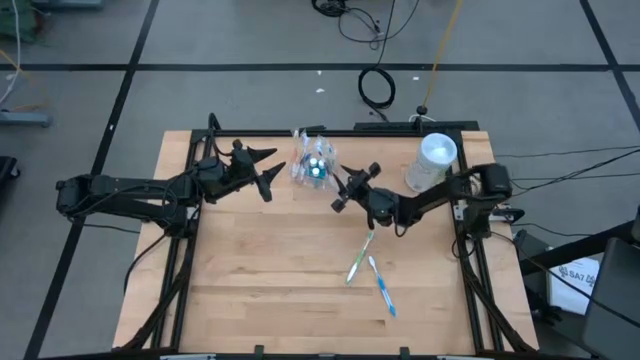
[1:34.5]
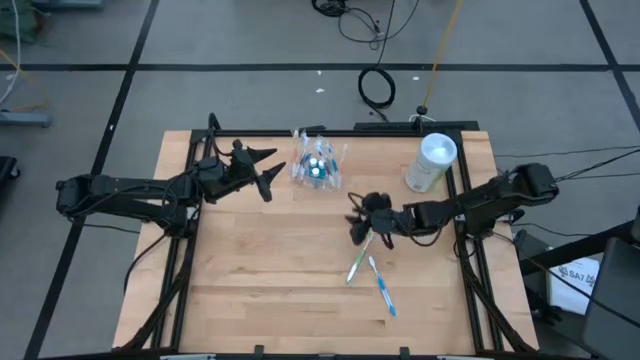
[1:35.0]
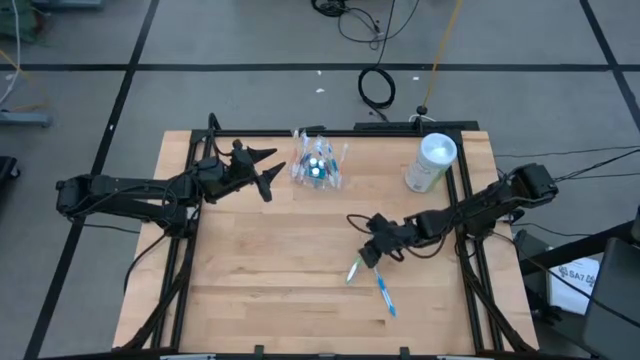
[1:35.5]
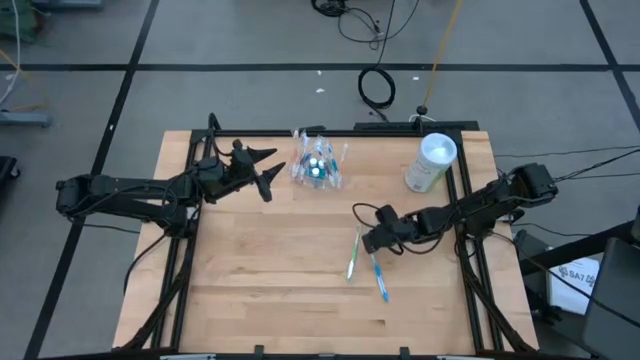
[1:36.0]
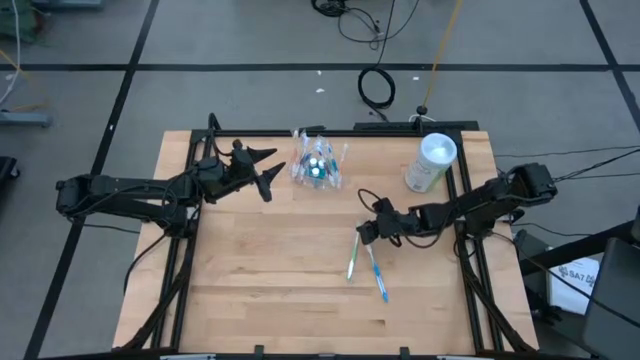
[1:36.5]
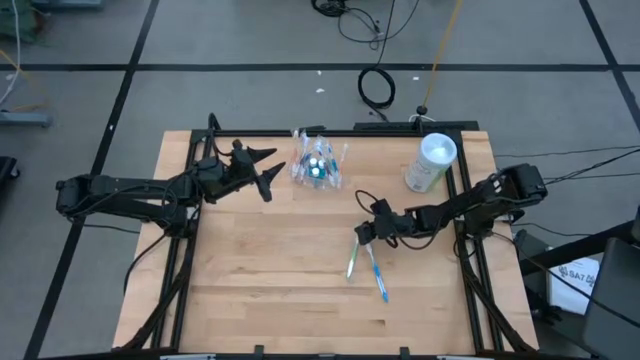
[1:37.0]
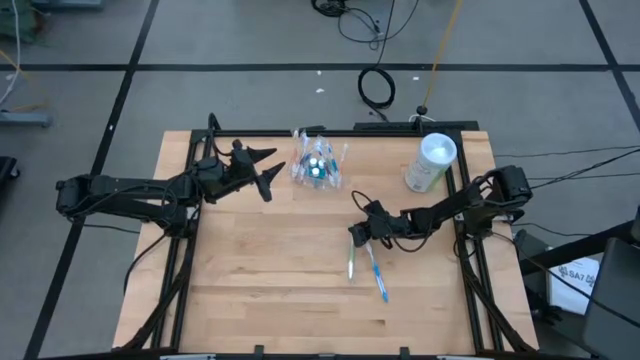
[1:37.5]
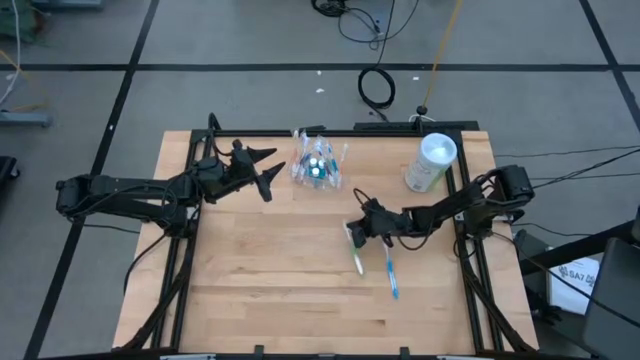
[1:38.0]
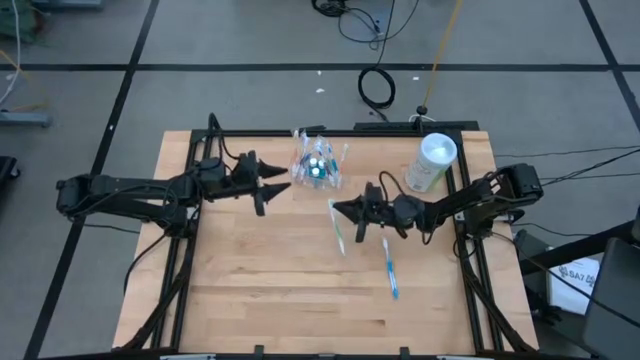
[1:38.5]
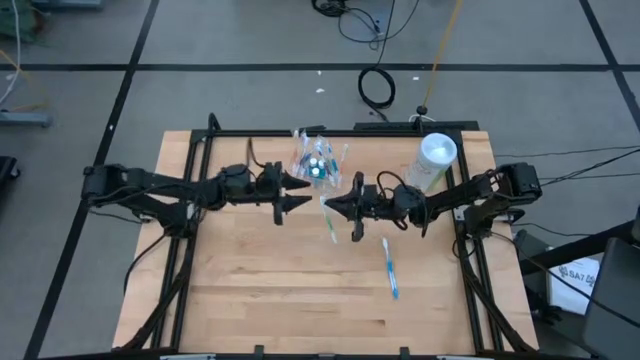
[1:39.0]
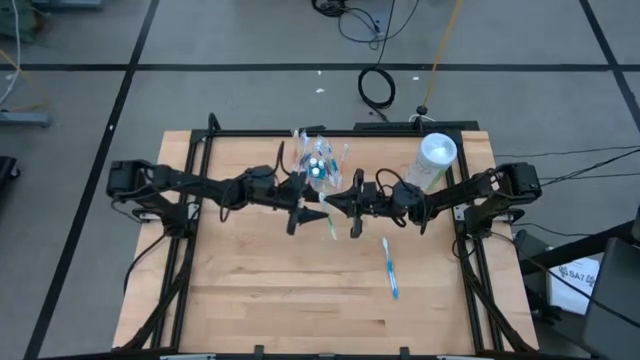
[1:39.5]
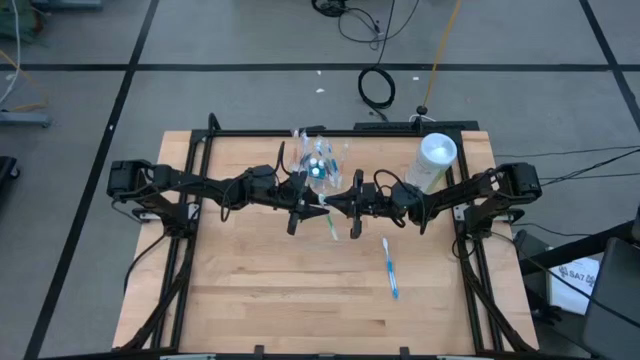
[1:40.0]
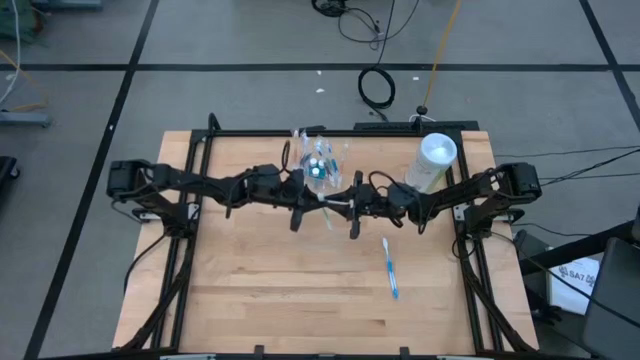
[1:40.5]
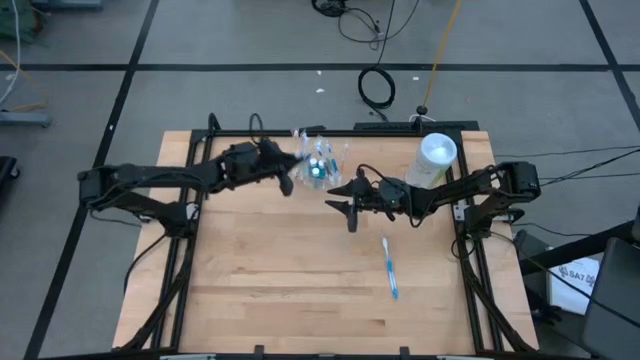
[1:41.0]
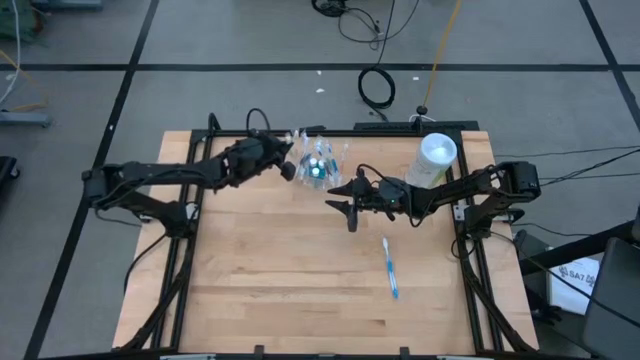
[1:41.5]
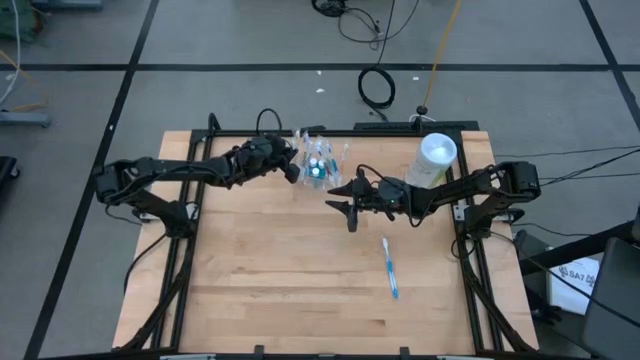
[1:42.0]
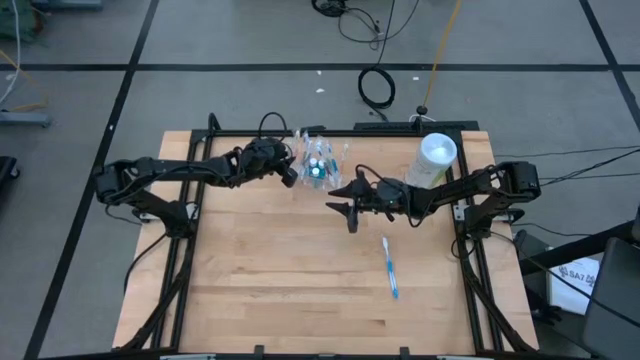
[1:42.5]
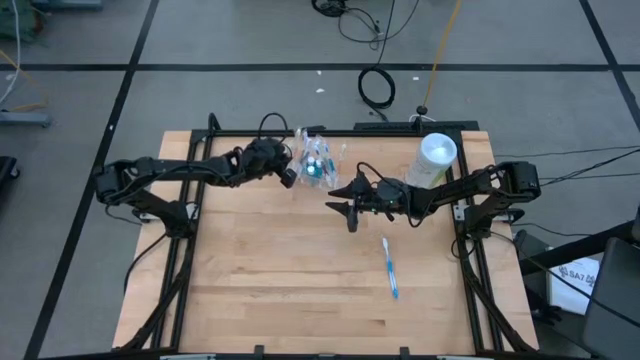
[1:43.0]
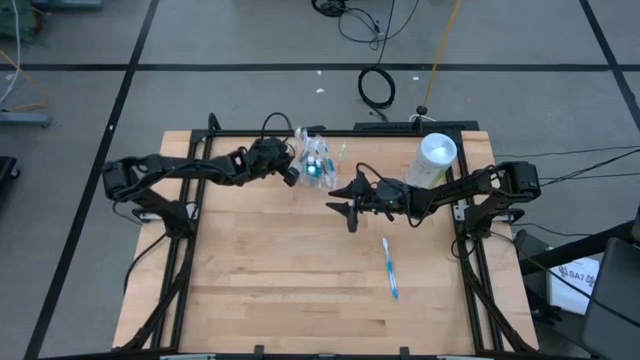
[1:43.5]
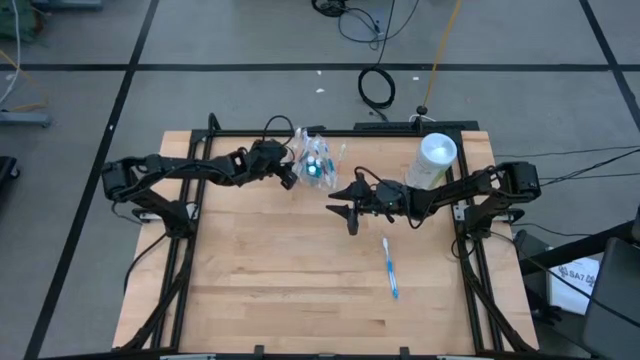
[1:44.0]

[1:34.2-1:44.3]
Task: Pick & Place toothbrushing station
Put the green toothbrush into the transparent organizer

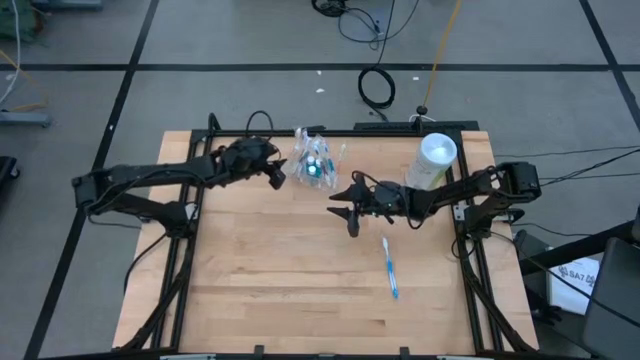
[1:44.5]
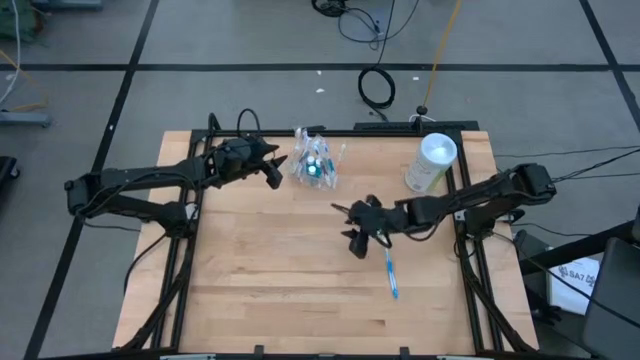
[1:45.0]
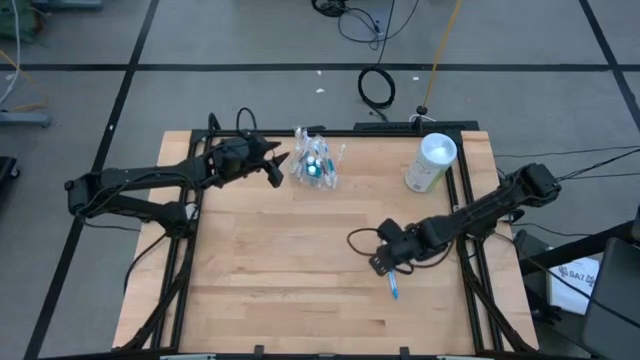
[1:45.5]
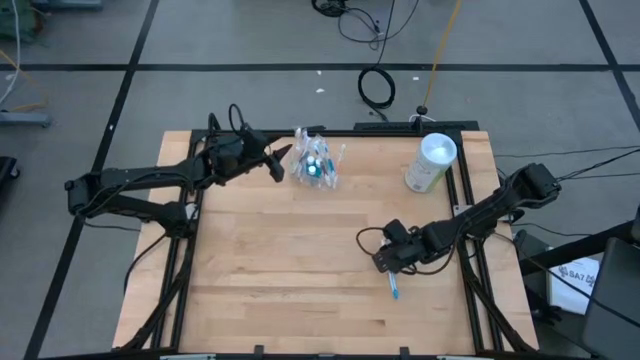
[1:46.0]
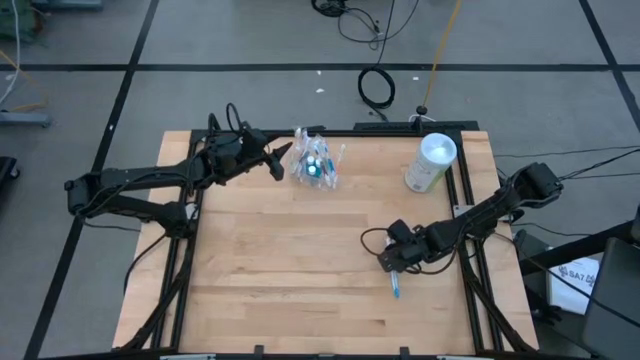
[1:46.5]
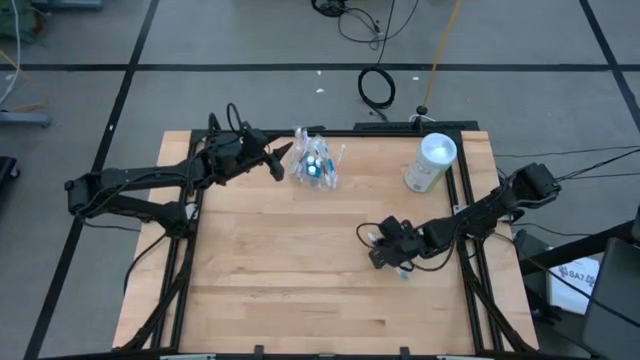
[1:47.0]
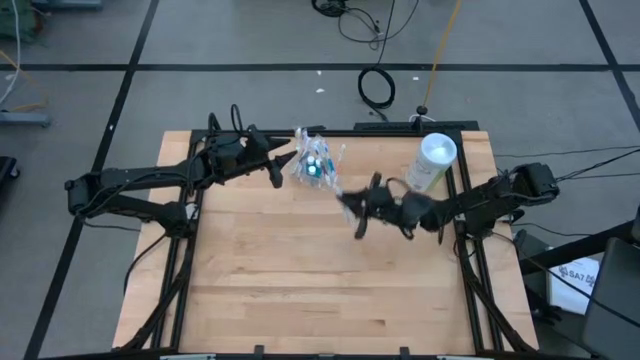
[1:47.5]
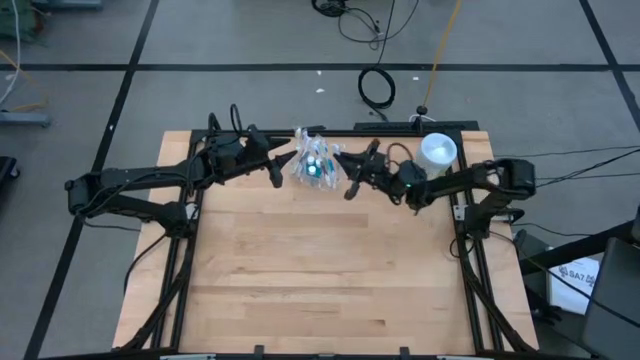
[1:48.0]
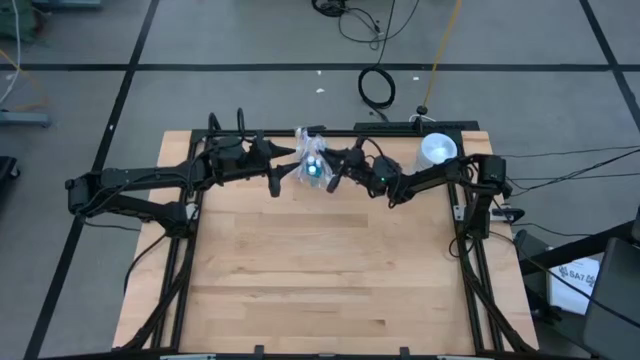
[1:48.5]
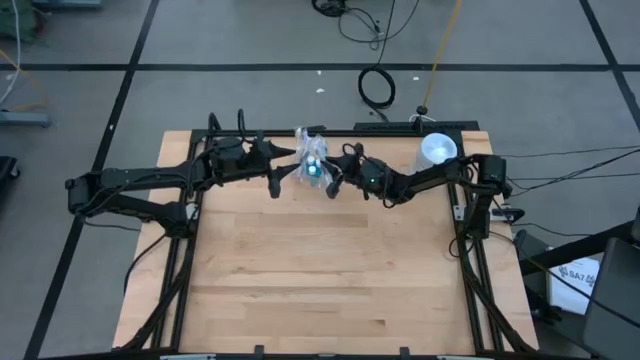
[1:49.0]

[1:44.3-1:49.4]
Put the blue toothbrush into the transparent organizer

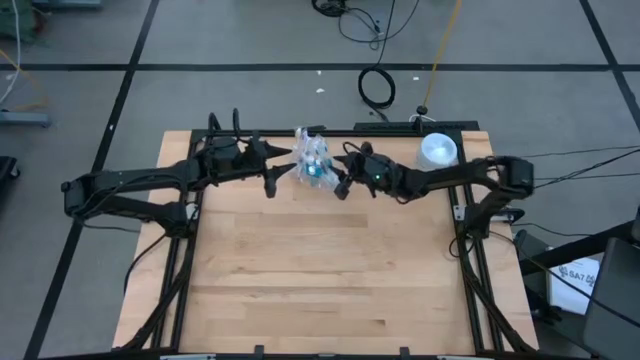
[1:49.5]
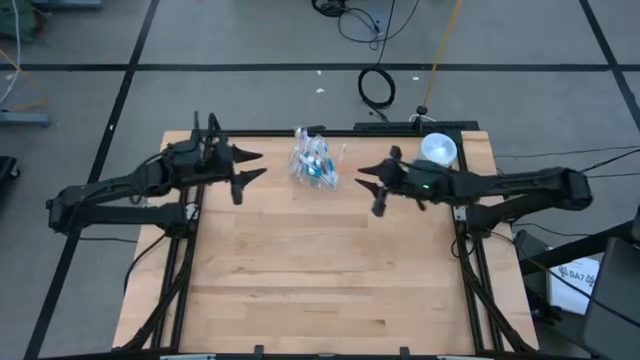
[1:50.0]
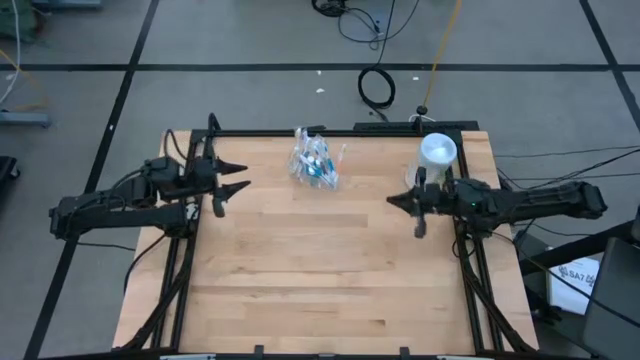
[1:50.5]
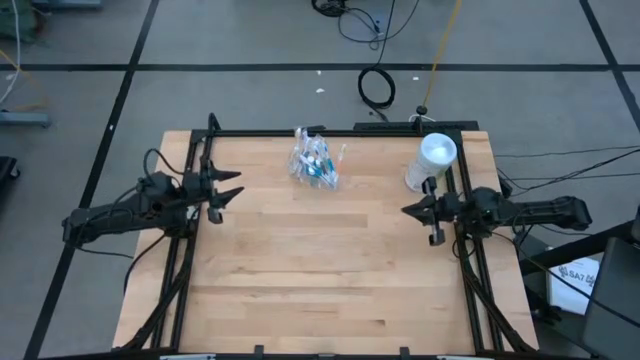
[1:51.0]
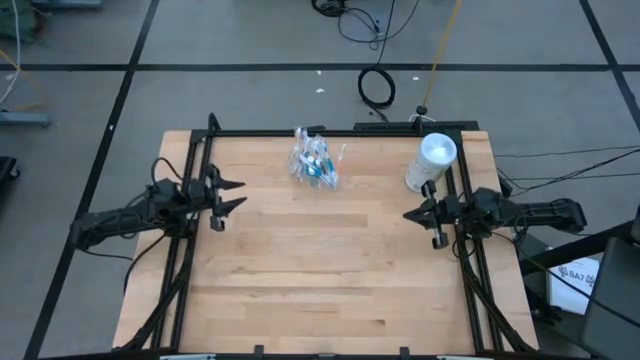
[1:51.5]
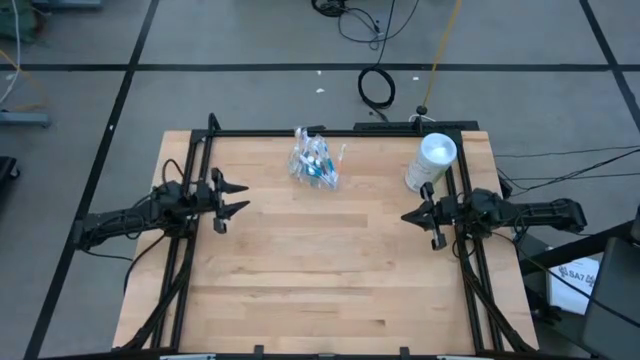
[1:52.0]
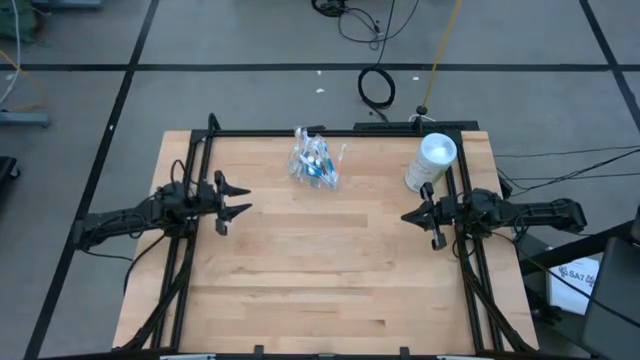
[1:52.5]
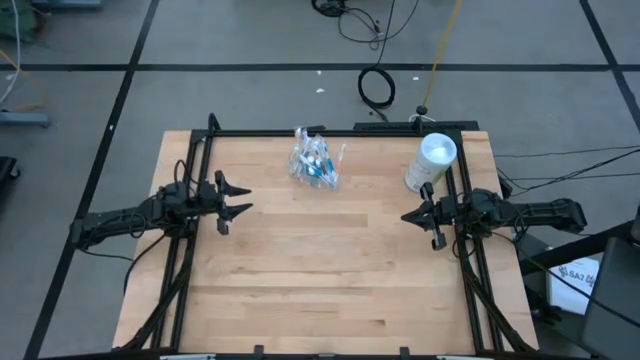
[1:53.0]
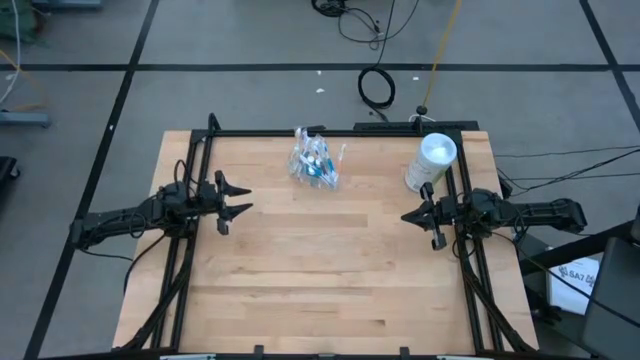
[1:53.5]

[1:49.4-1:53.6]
Return to Home Position
